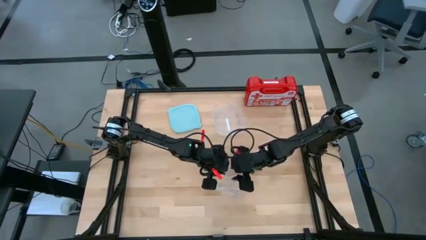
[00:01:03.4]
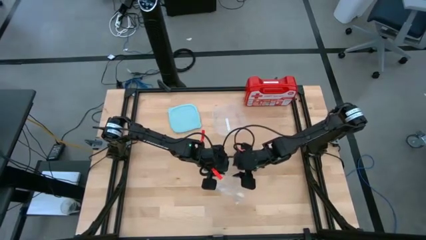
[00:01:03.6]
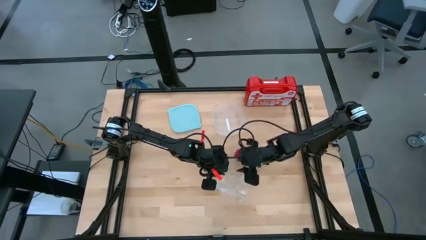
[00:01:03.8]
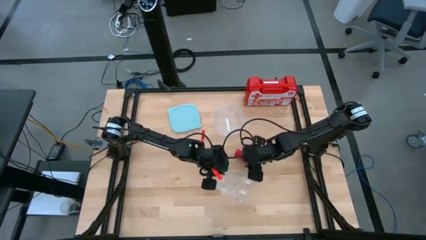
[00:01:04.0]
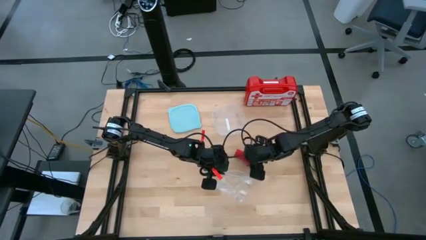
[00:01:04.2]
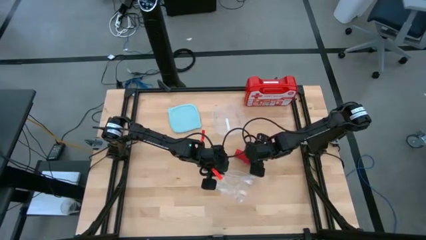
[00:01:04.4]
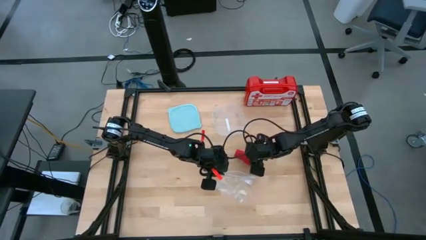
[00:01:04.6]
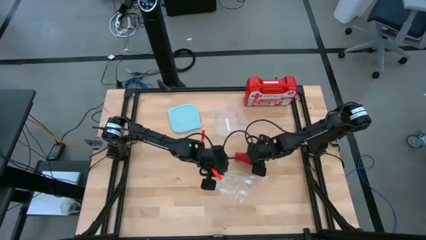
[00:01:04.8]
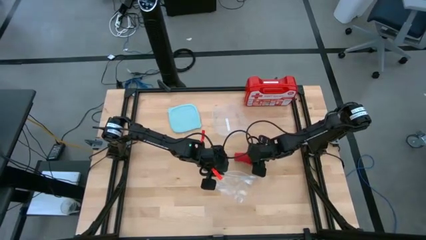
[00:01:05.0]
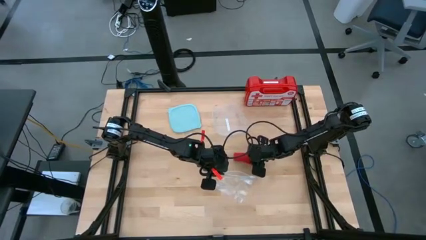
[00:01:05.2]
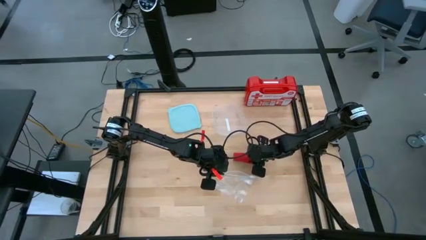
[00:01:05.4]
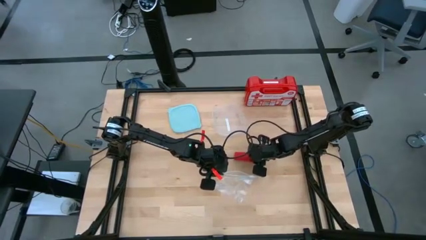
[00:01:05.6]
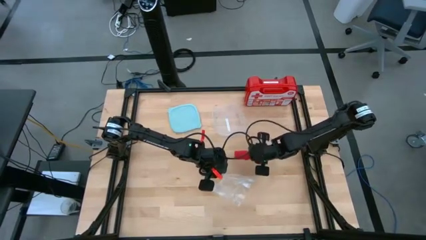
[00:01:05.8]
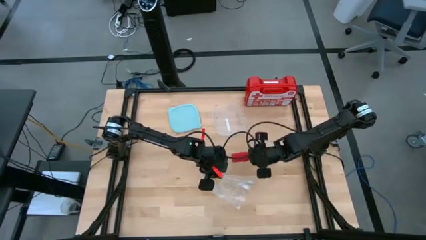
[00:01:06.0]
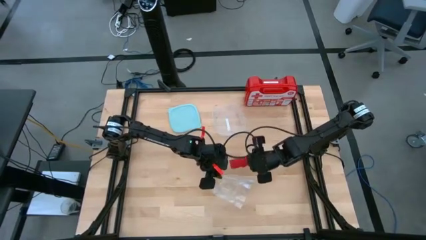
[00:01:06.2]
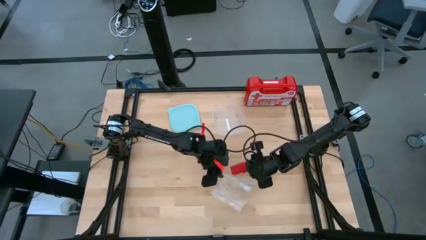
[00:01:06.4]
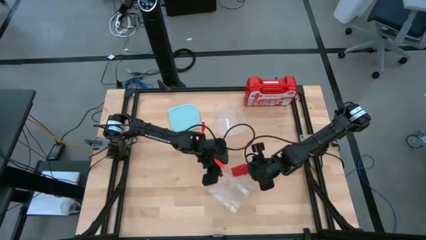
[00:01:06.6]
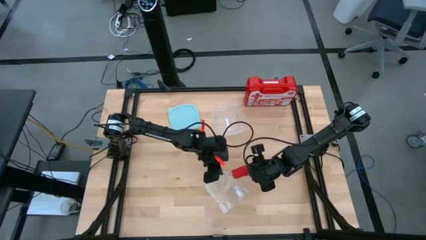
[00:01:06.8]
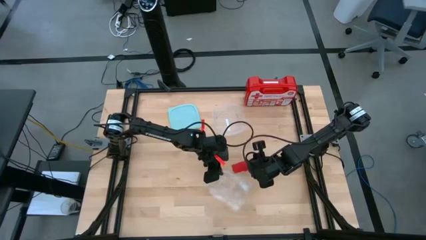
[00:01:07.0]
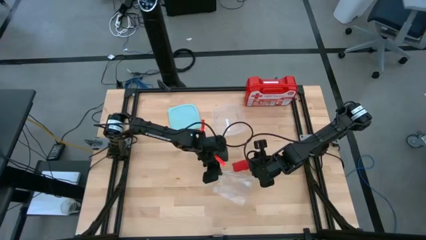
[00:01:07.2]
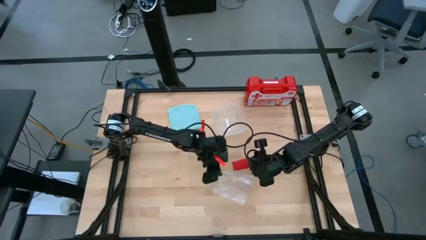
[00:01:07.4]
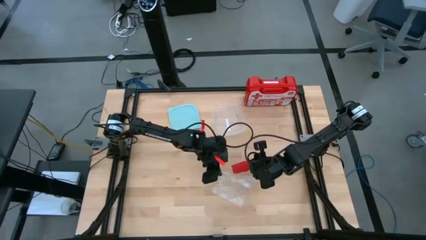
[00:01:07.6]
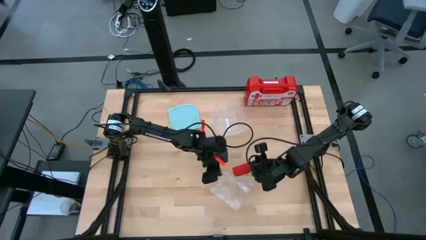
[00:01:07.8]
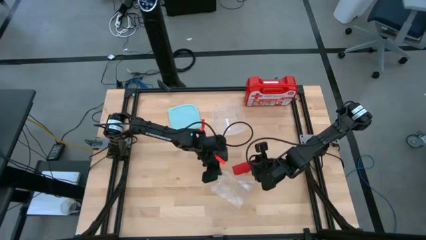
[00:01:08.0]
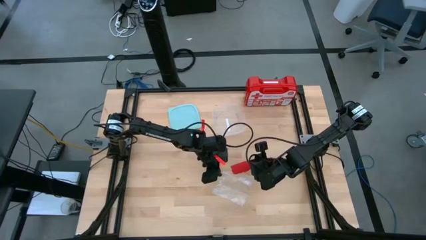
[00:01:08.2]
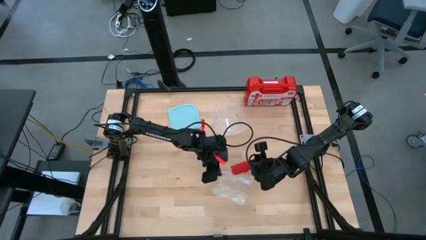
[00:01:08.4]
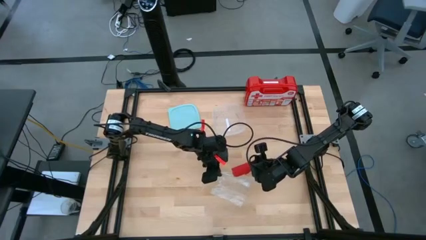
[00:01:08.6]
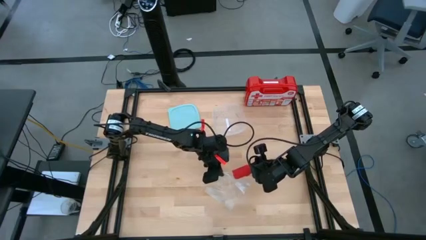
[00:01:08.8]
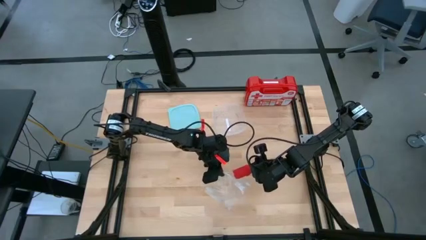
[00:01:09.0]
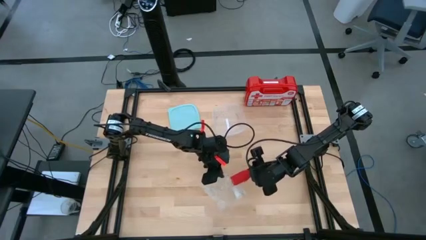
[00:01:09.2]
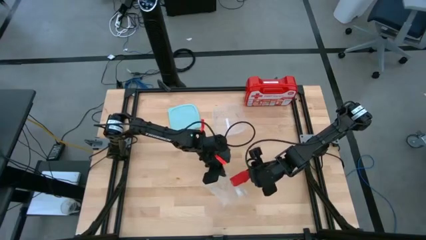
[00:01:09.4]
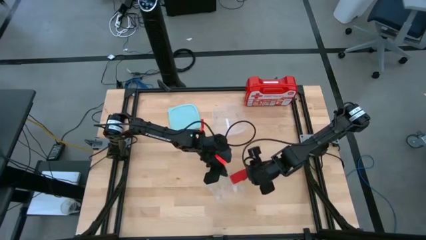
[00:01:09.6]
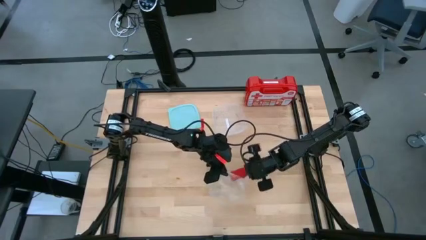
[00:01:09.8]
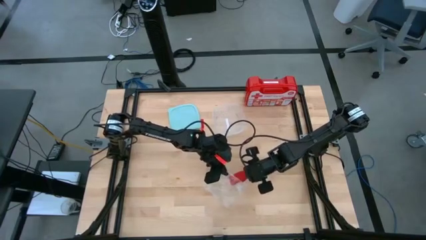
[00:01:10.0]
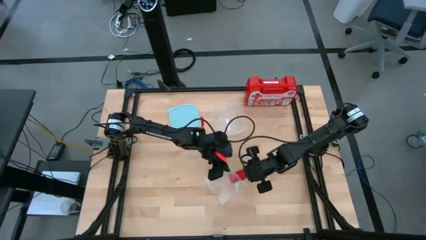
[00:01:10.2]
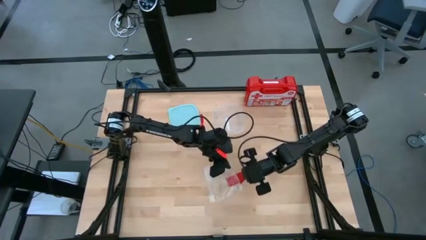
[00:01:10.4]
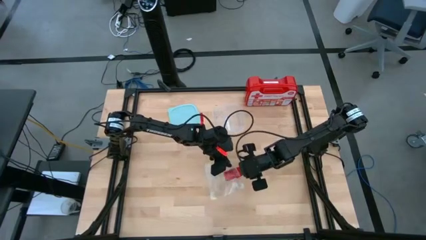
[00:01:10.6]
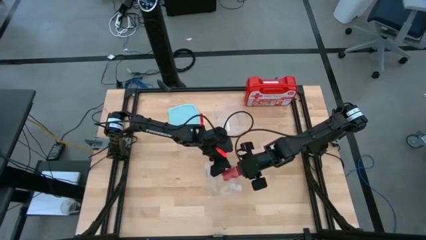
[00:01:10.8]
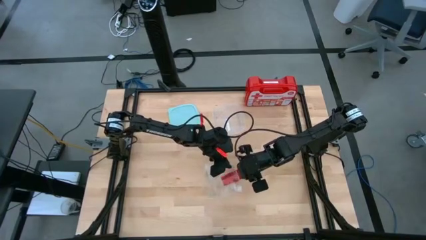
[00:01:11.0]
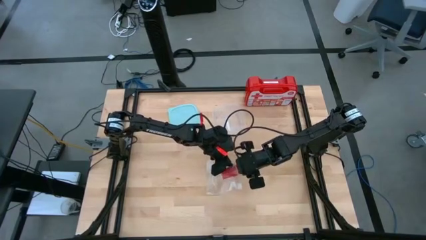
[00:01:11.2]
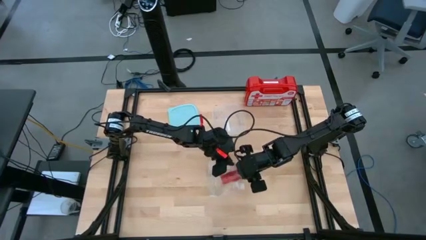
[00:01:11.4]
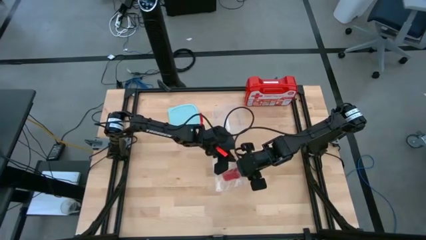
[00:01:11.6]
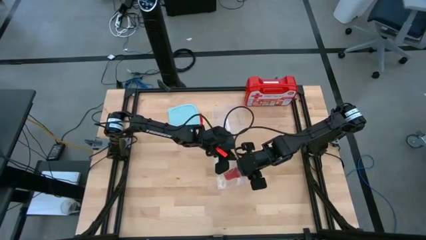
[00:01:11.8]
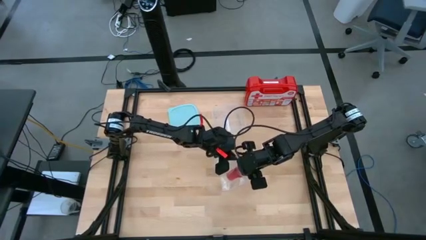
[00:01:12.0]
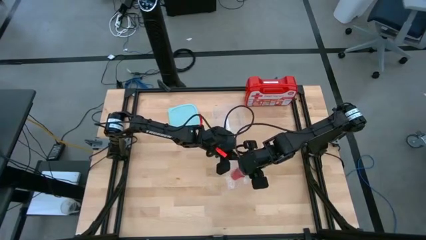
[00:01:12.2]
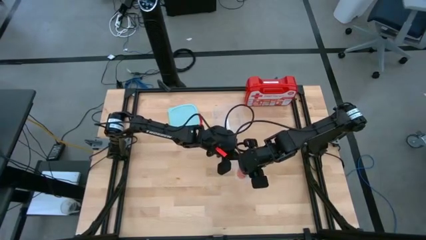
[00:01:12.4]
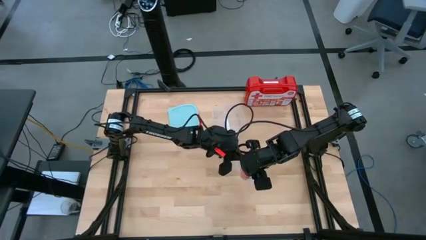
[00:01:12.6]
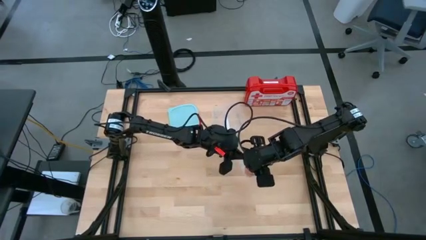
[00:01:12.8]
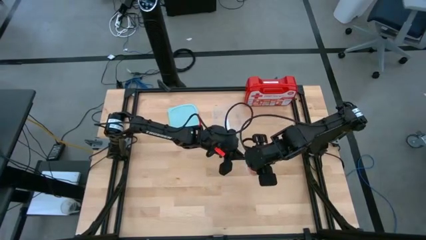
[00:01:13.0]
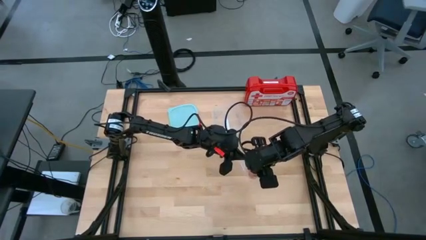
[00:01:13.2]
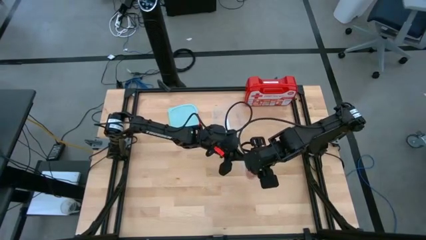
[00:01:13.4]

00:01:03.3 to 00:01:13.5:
Task: Roll bandage
Put the rolled red bandage into the transparent zip bag

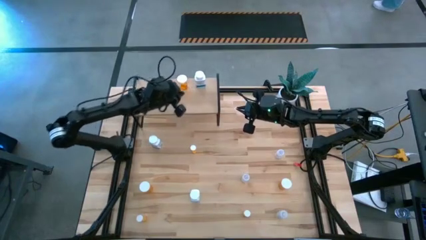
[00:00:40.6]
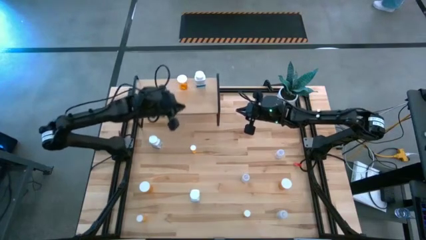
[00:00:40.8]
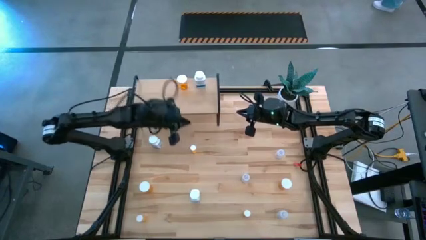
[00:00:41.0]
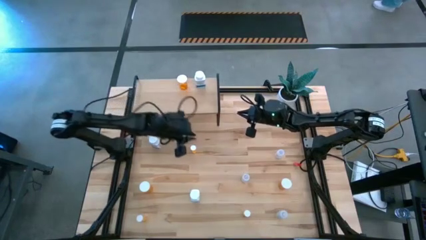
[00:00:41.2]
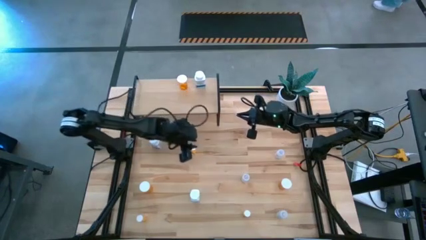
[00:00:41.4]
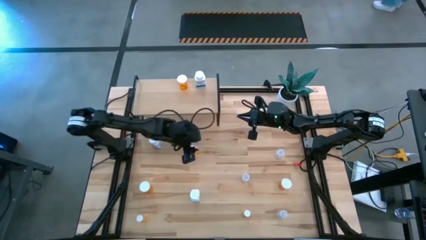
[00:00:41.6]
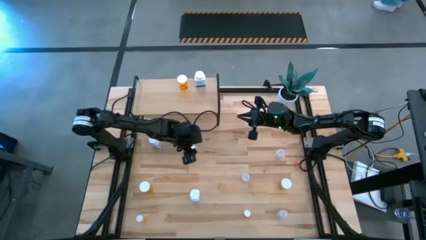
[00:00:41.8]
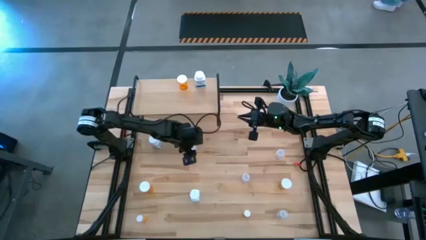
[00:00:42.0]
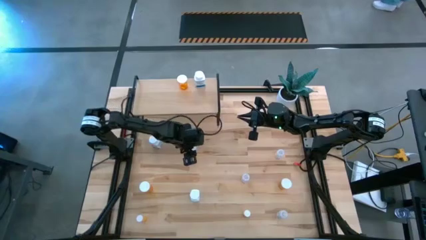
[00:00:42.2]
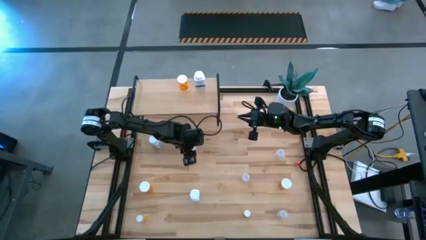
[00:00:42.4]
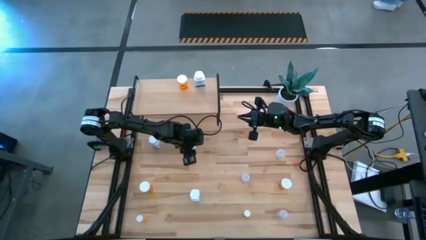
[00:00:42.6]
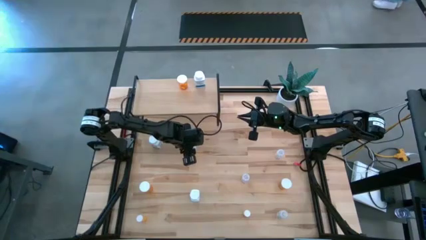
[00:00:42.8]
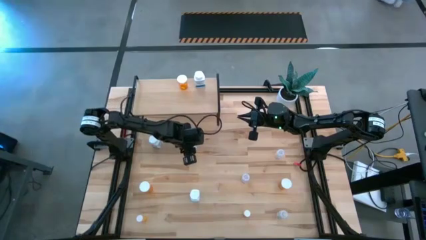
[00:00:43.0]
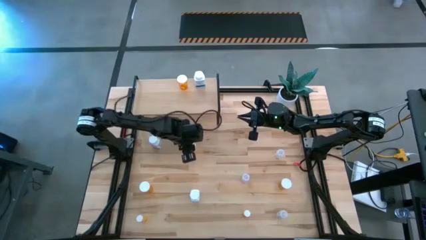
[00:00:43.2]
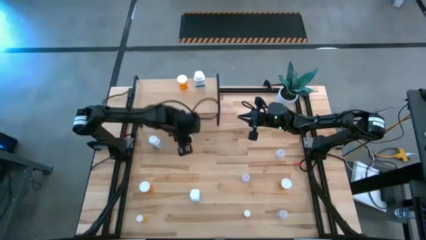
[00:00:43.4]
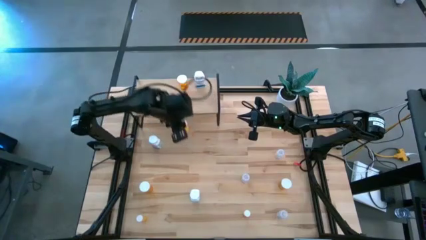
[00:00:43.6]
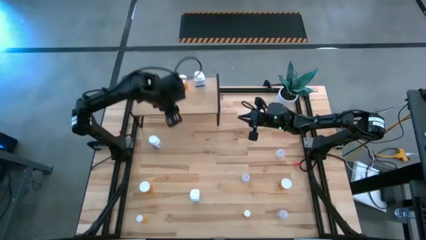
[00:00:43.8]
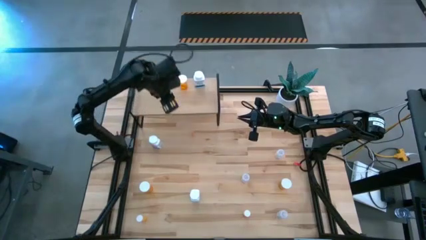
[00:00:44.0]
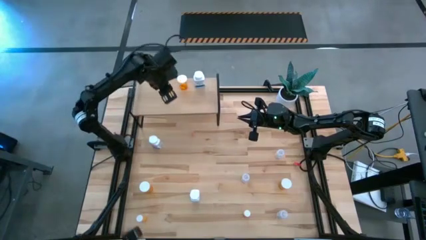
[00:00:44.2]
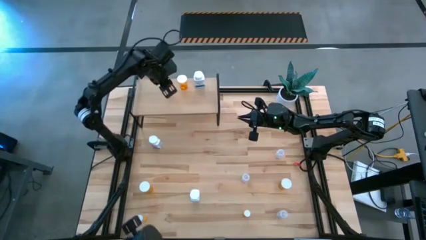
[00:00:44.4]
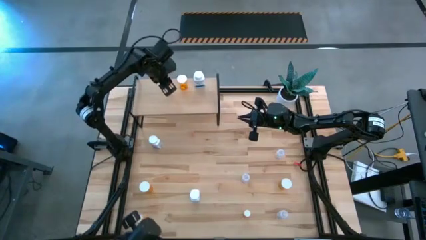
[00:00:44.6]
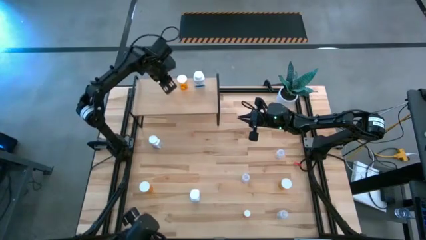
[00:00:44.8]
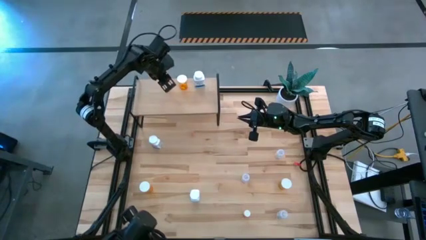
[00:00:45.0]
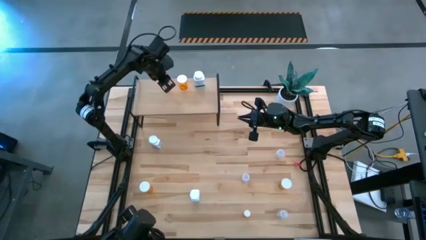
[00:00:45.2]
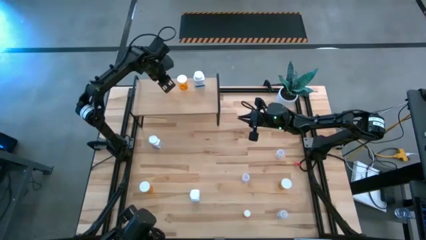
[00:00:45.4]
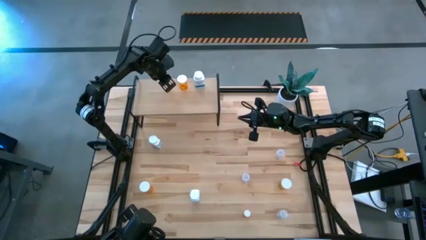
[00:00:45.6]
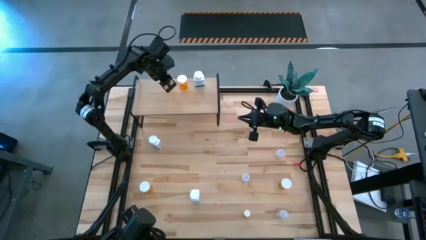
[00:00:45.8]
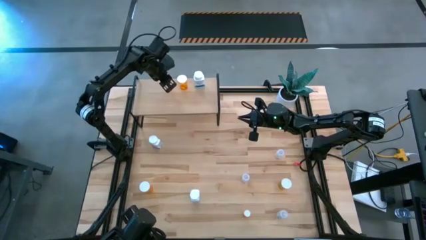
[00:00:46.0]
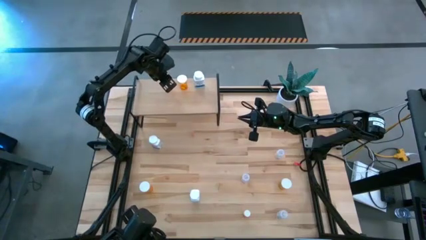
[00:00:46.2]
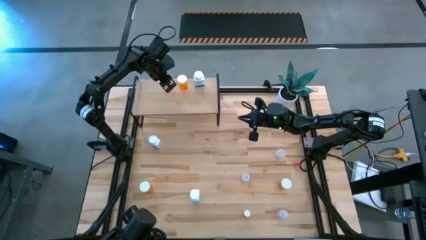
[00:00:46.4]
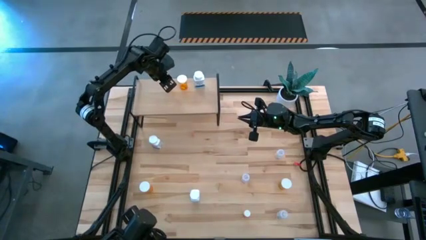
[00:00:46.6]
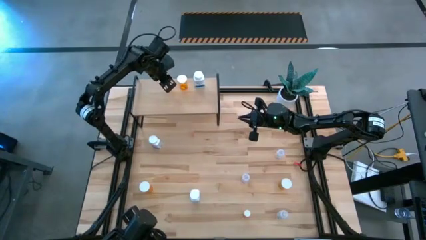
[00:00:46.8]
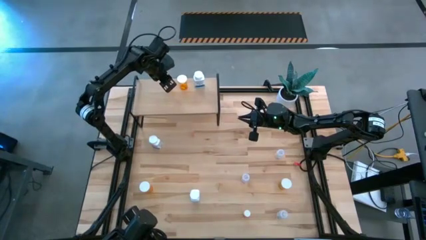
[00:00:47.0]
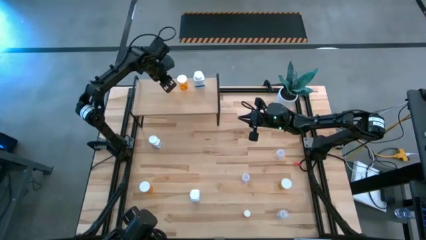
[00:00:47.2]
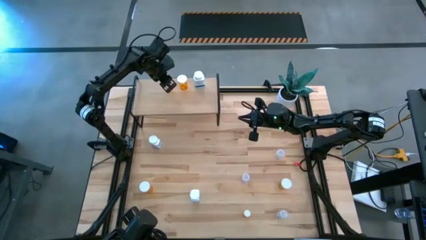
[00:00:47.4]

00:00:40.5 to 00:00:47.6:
Task: Pick and place medicine bottles onto shelf by color
Put the top small orange pill bottle on the shelf
